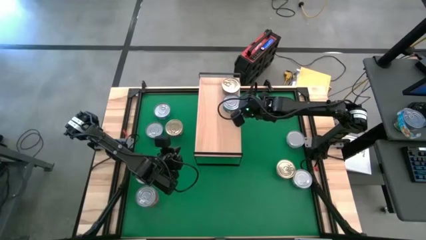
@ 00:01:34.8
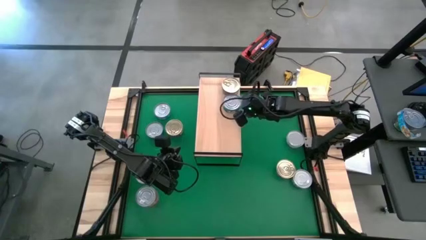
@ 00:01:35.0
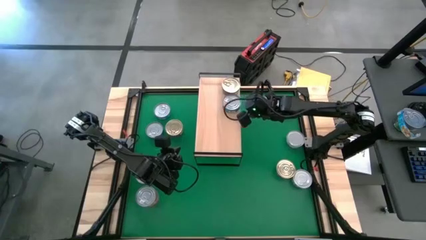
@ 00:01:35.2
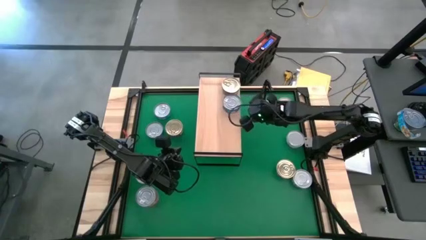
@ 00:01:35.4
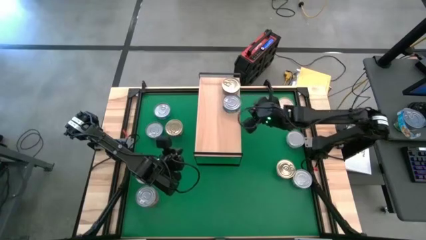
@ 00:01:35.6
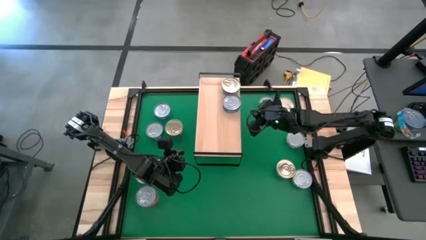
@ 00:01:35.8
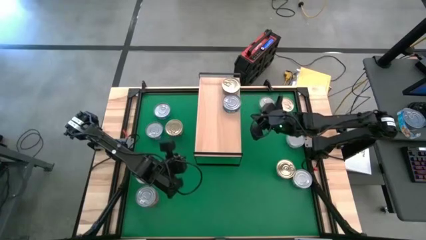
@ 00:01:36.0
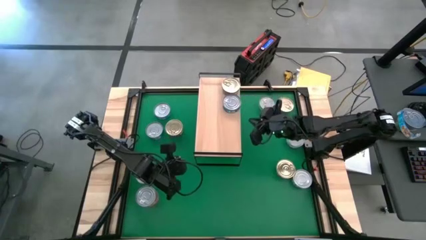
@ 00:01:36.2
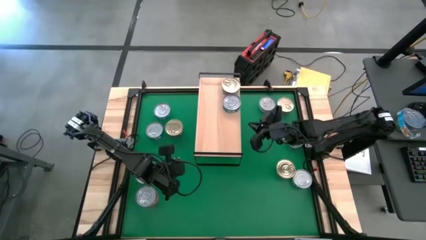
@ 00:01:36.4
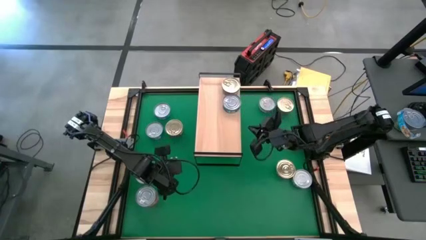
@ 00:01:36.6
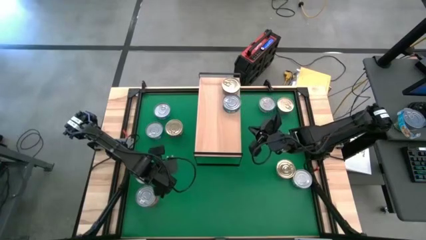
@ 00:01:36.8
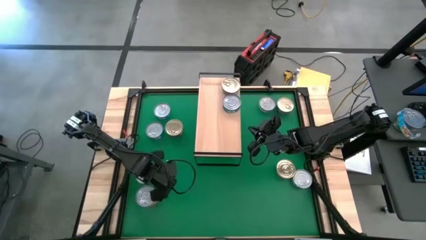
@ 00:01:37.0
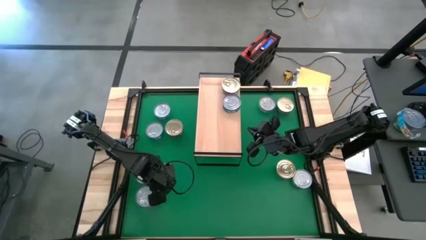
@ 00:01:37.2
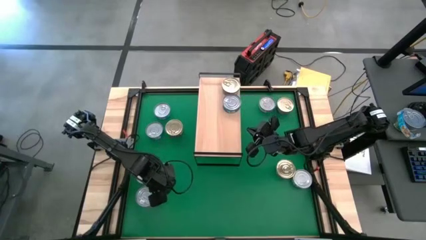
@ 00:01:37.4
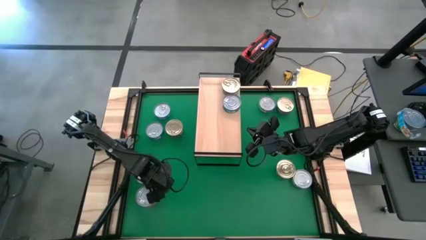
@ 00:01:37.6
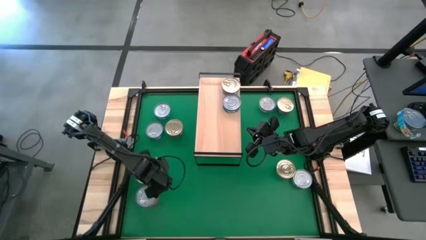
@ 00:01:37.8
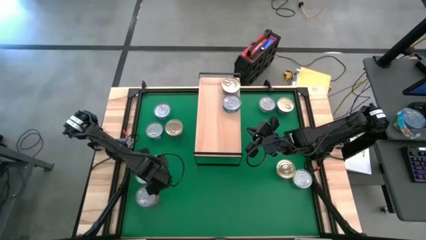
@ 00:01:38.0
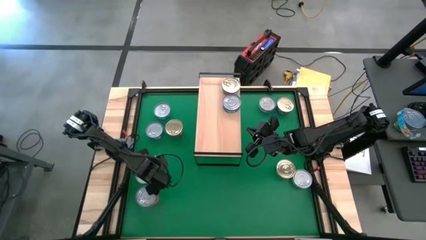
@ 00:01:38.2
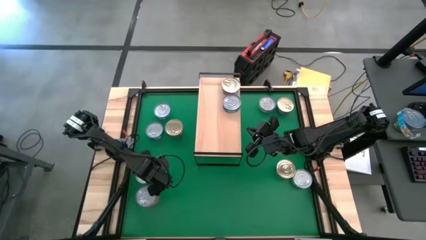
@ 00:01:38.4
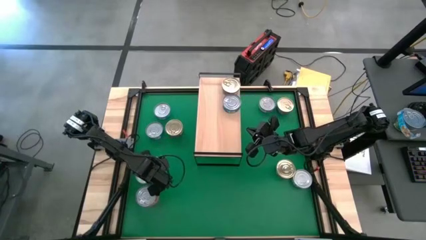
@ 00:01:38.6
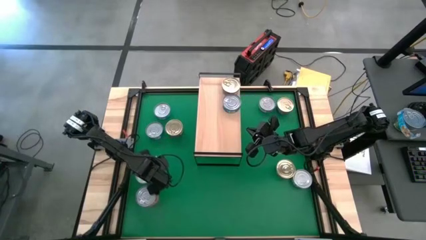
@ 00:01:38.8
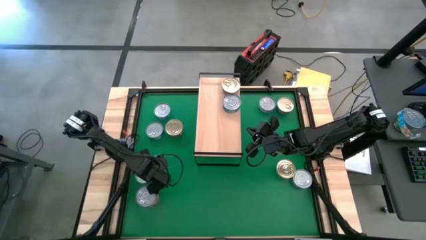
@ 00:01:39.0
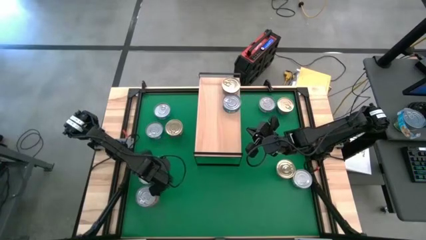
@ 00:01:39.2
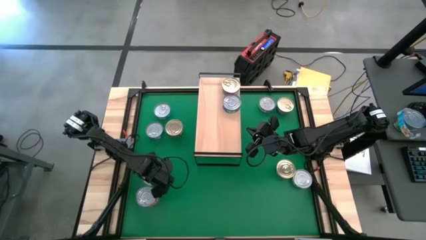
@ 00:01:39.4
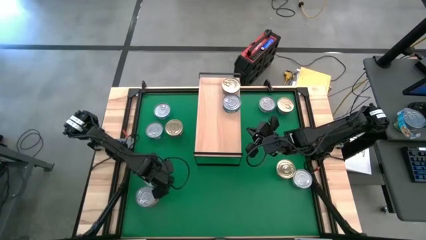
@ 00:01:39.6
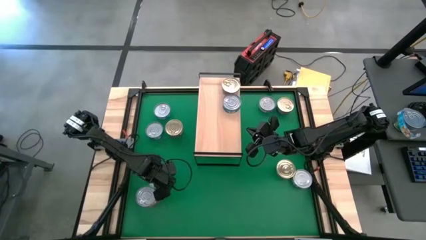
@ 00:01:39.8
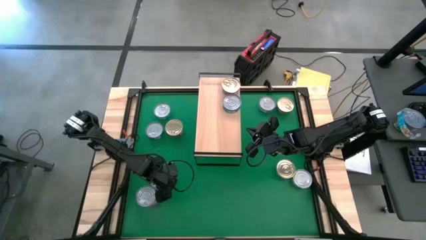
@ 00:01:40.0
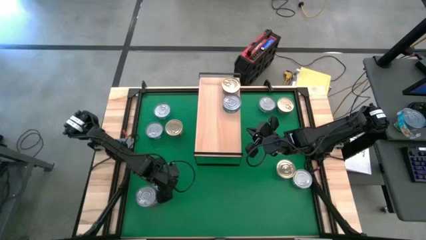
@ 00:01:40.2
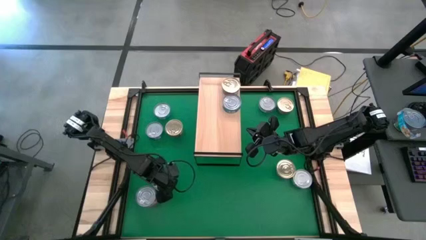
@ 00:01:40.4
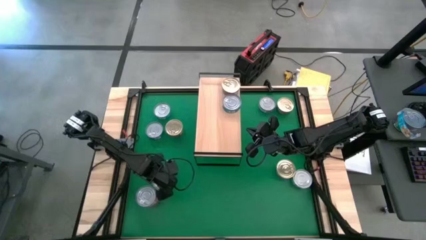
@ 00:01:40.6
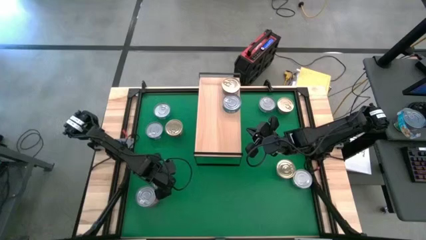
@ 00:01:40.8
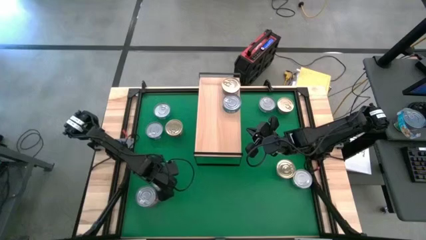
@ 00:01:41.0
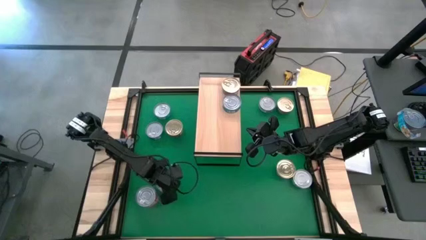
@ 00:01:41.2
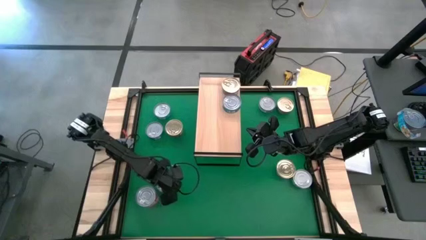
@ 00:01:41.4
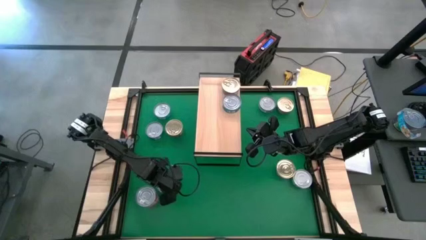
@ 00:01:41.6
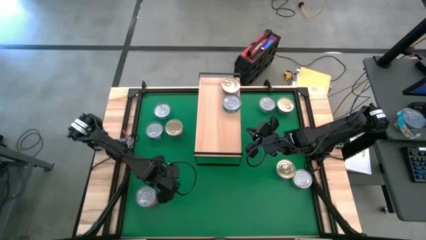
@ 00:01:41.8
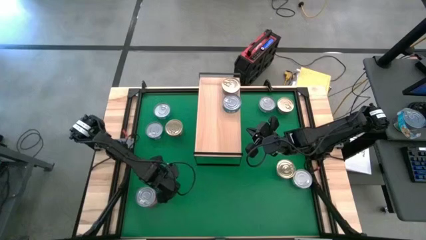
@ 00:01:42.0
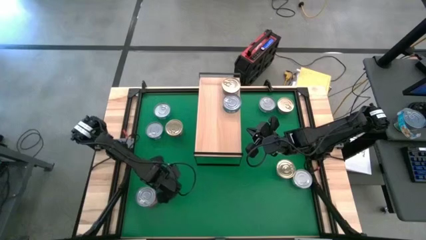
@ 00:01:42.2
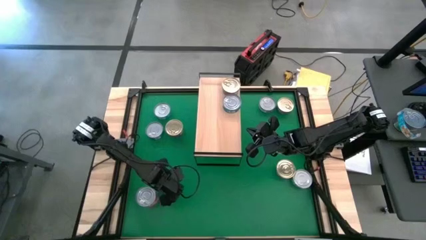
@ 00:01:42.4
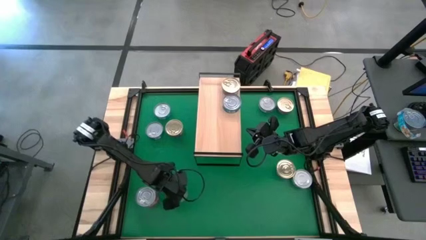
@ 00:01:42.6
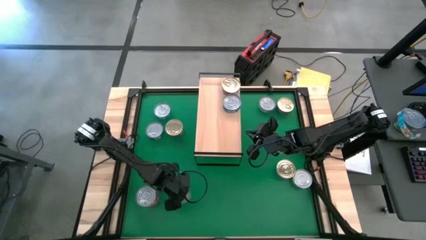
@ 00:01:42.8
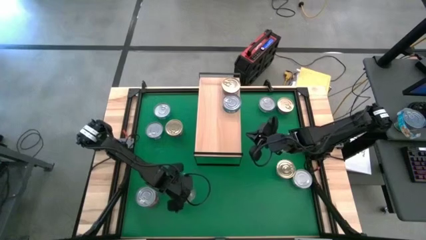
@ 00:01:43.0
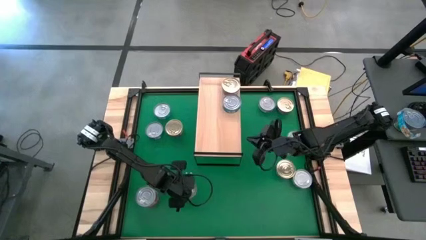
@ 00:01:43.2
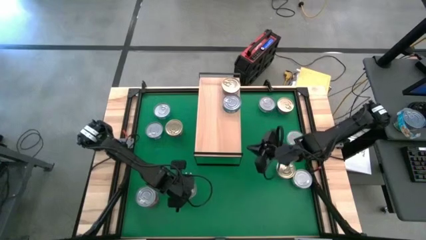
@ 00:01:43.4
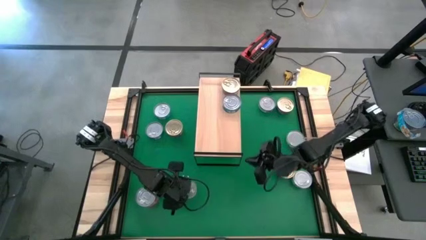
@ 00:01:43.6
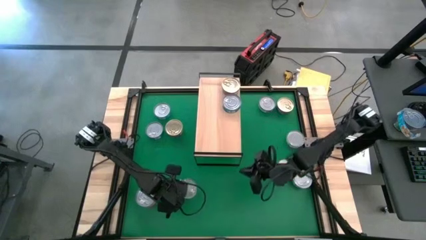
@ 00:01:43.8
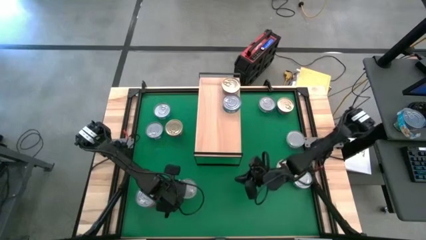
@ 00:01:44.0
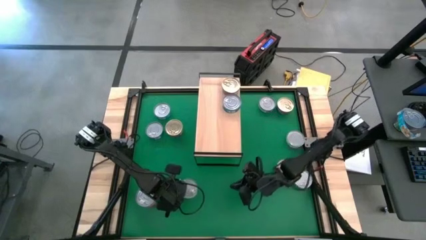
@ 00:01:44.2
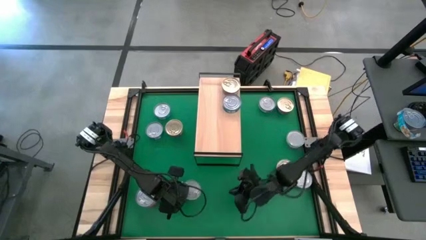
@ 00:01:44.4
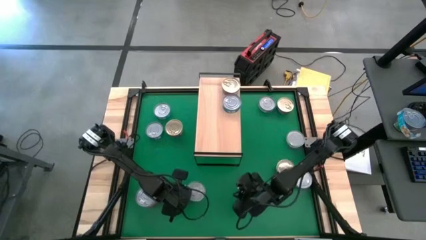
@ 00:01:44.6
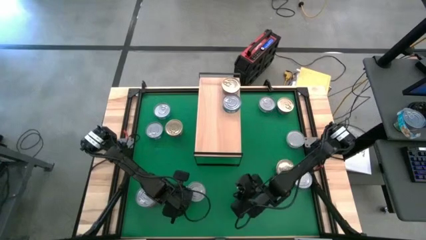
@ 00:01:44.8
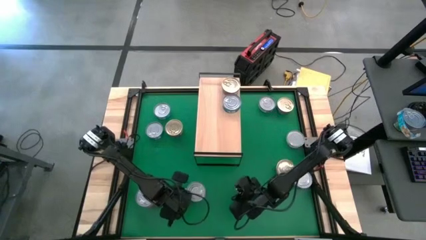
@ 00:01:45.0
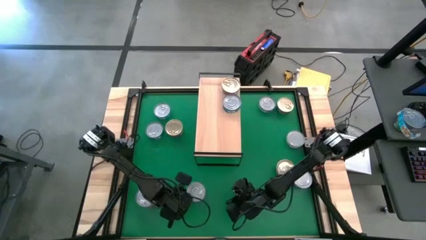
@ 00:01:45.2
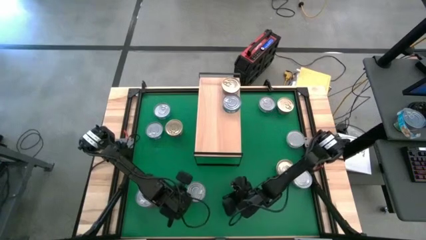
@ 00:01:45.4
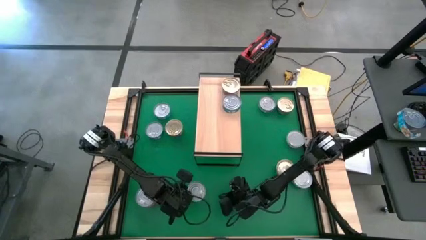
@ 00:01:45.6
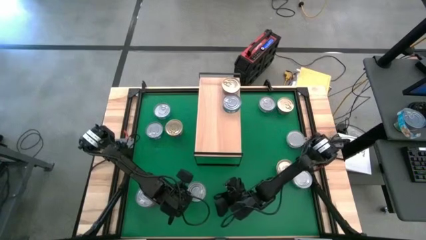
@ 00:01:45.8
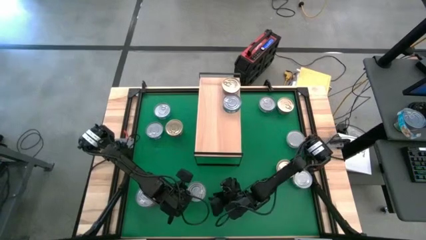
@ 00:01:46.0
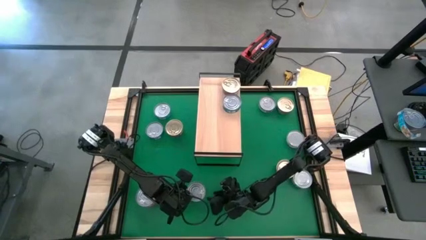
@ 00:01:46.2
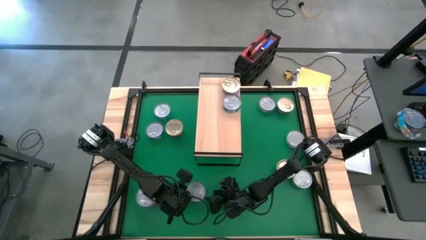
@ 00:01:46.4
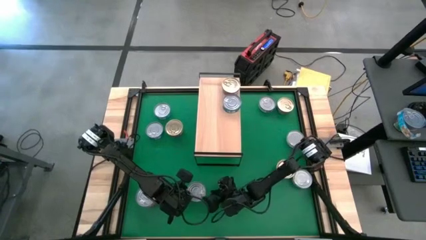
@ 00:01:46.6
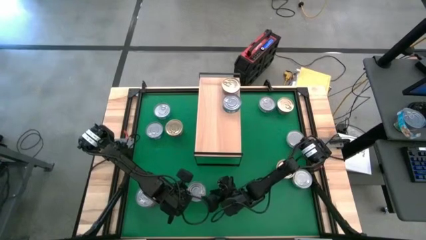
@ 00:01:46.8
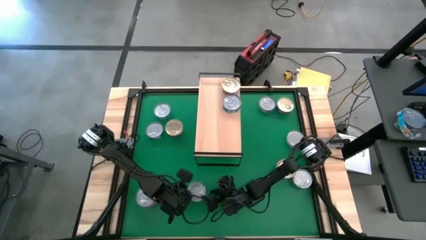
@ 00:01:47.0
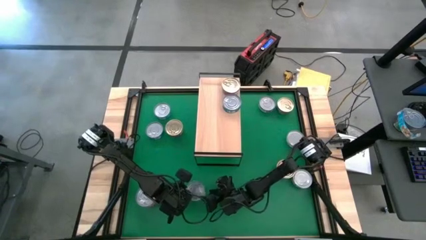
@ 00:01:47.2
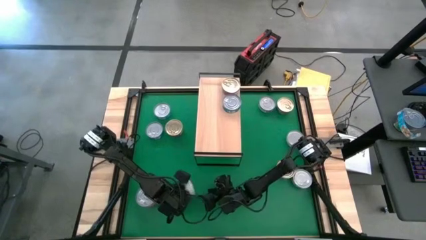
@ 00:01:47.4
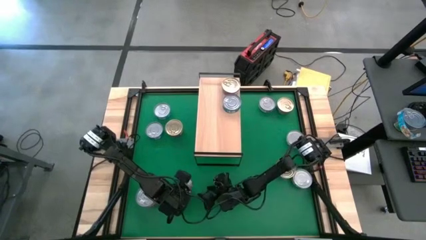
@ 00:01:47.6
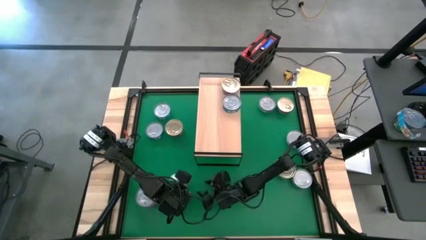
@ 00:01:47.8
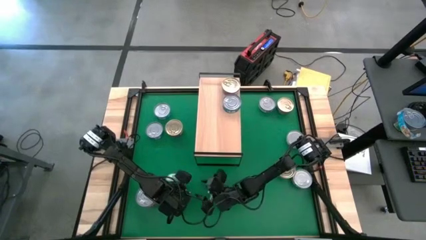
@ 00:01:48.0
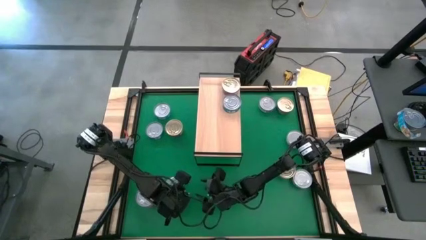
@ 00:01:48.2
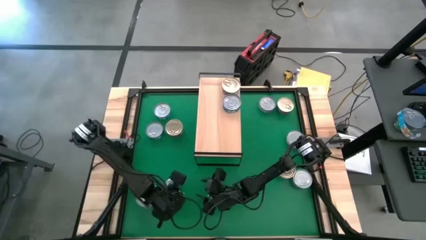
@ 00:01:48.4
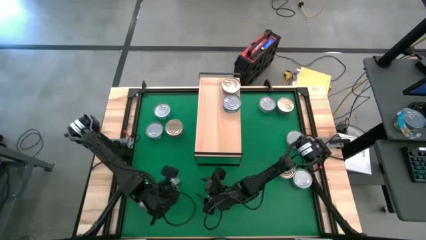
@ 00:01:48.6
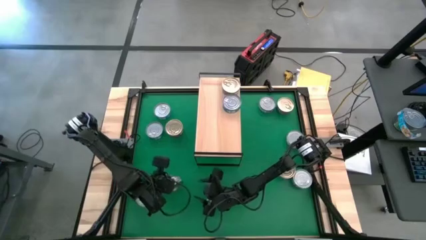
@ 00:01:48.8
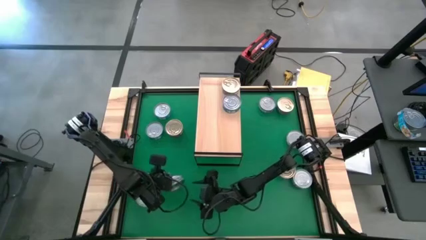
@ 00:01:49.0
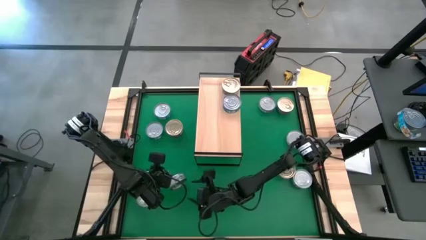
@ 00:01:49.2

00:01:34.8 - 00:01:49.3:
Task: Stack canned seafood by type on shelf
Put the bottom green tuna can on the shelf
